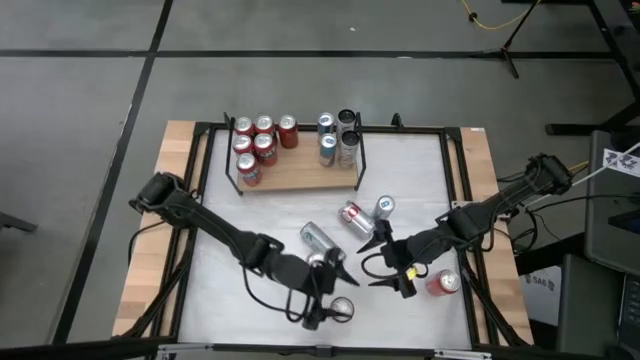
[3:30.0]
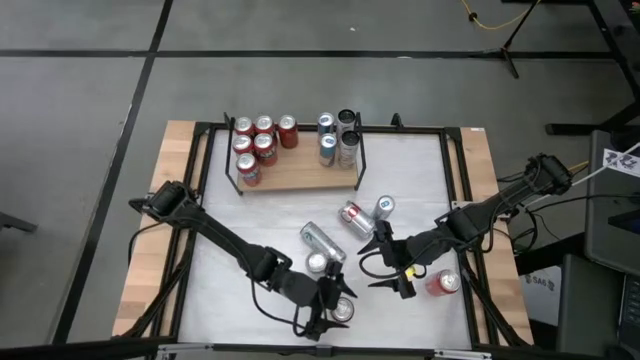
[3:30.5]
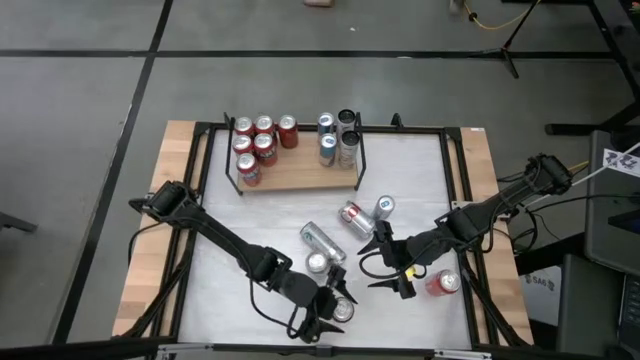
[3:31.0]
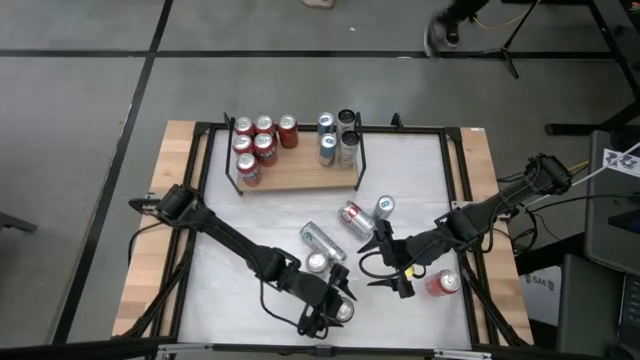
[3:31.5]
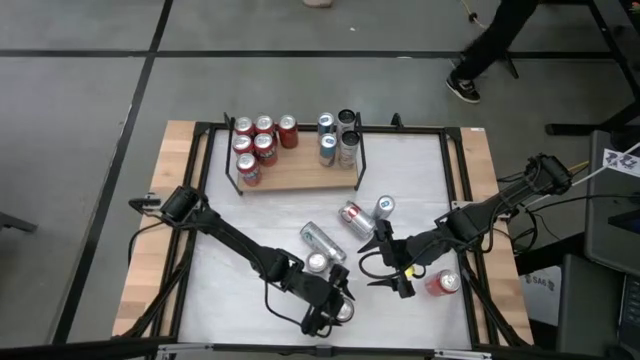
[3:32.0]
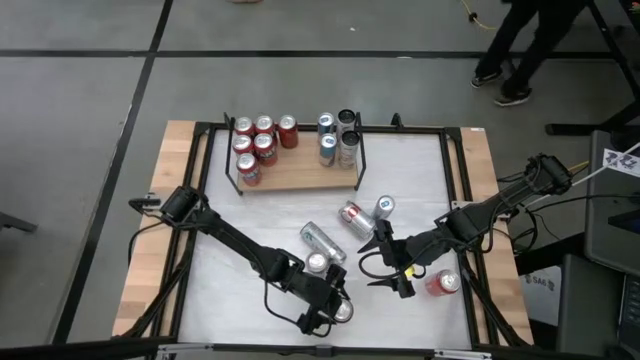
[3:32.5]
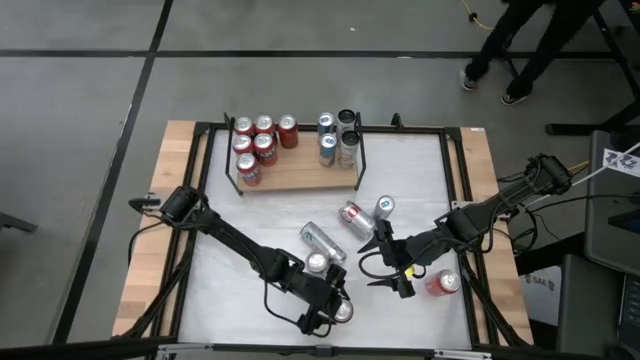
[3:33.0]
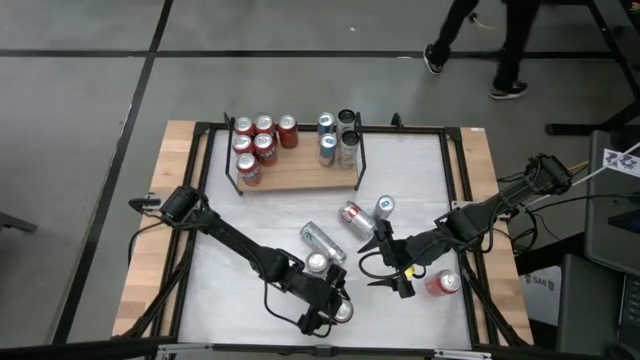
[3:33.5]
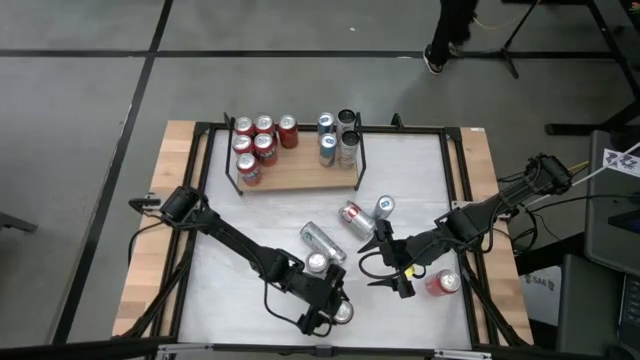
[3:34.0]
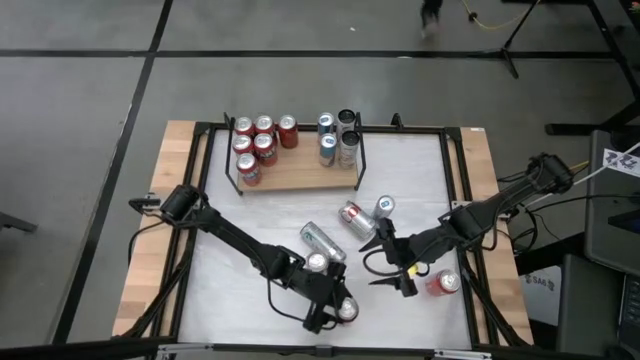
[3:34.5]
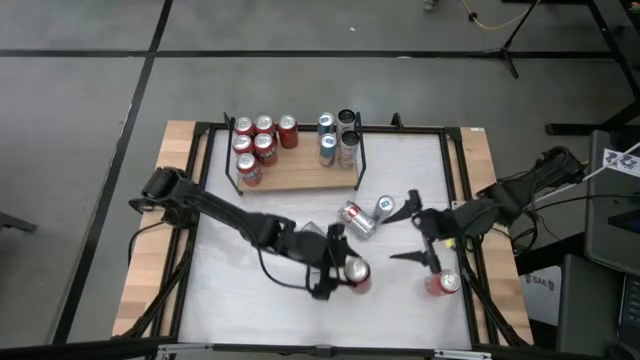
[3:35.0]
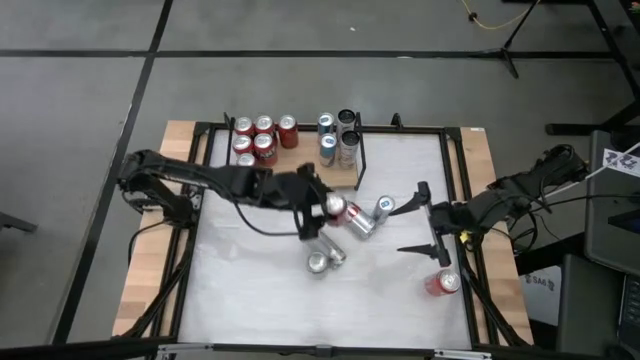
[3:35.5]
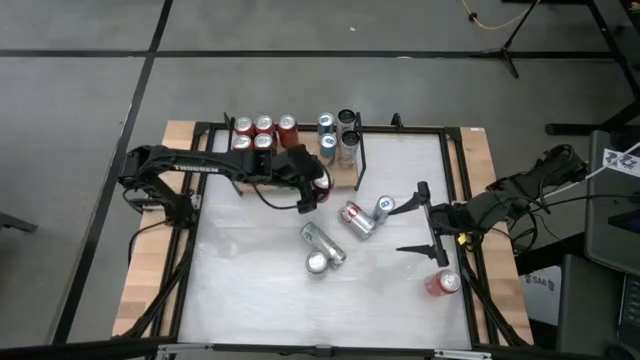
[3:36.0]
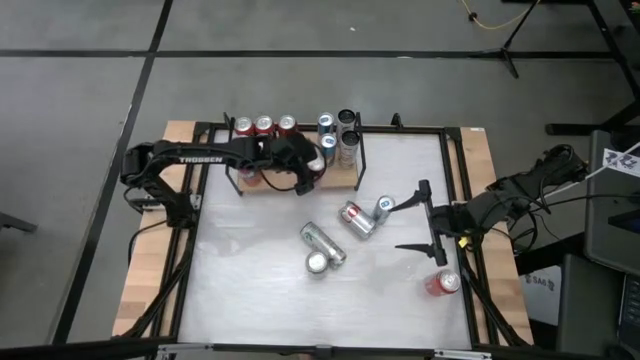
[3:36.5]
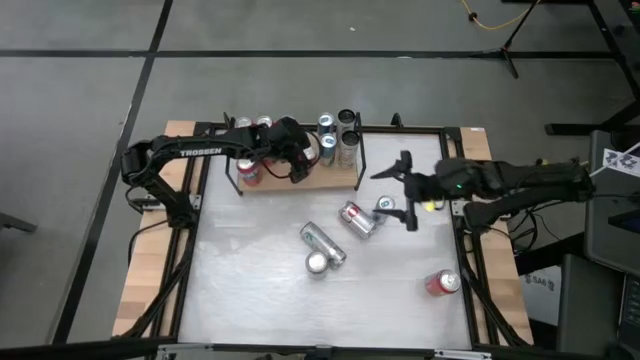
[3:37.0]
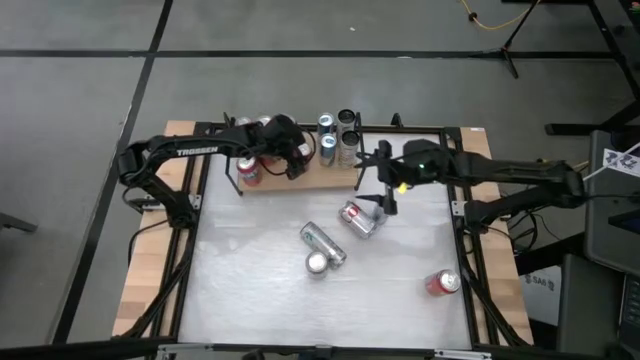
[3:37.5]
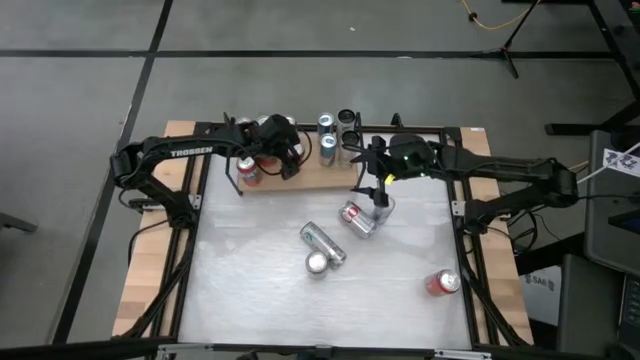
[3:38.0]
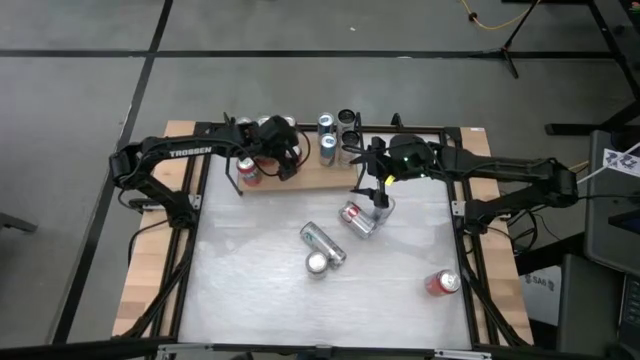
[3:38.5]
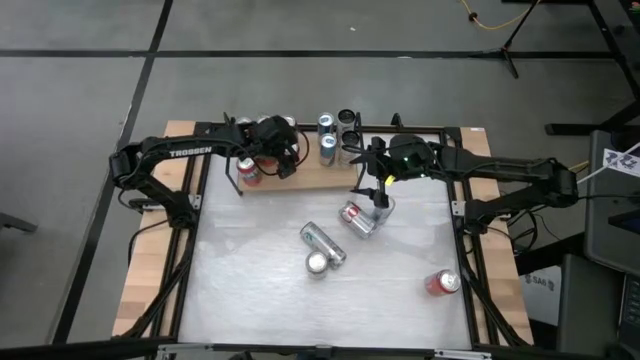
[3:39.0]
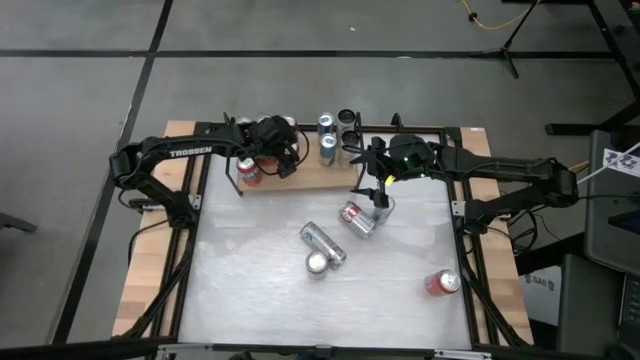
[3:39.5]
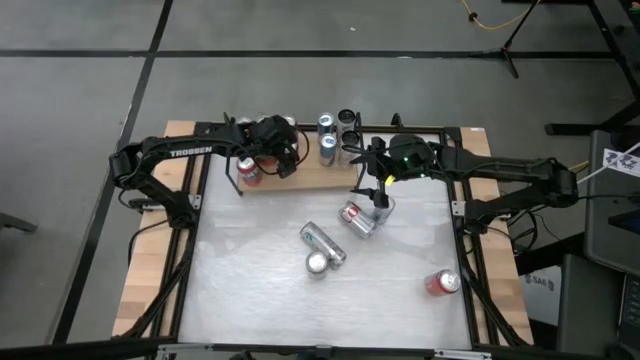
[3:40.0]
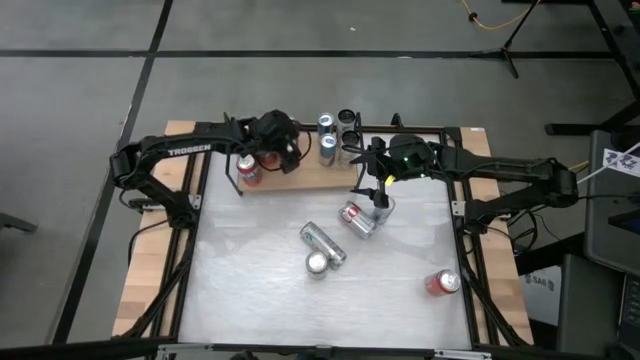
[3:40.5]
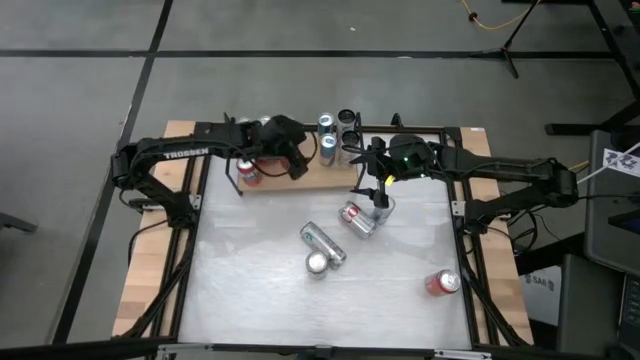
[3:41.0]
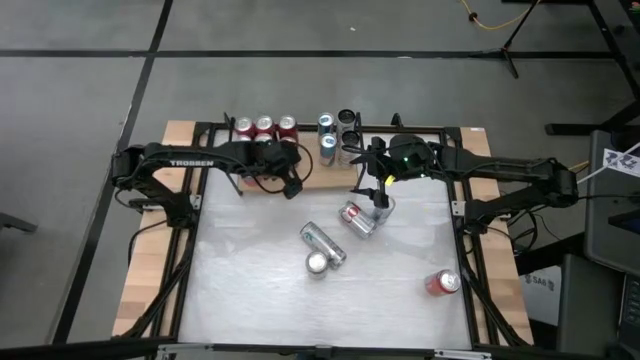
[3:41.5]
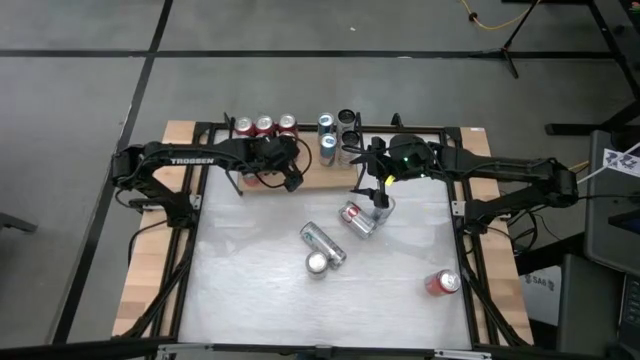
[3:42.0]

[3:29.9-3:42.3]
Task: Place canned beverage on shelf
Put the red black soda can on the shelf aligned with the other red black soda can

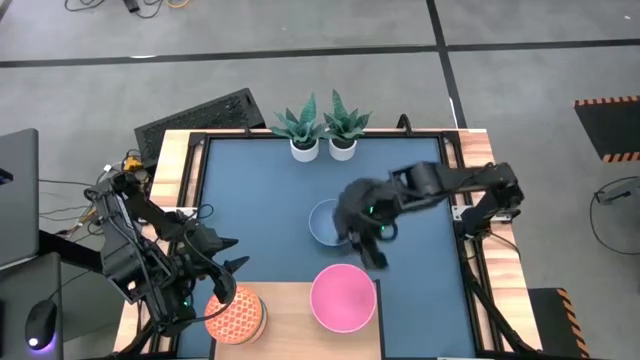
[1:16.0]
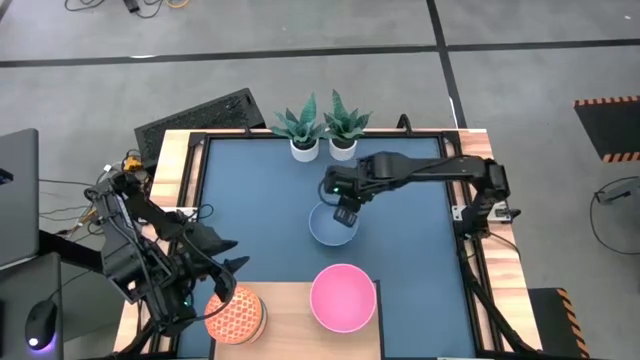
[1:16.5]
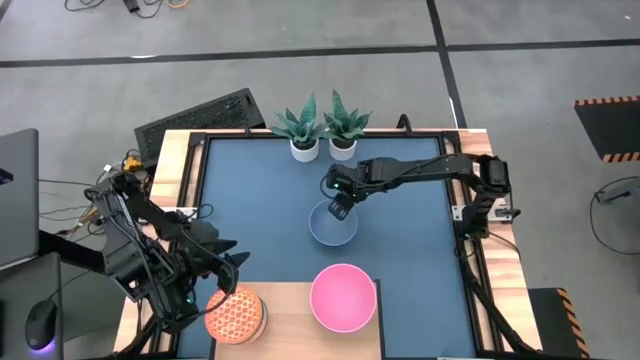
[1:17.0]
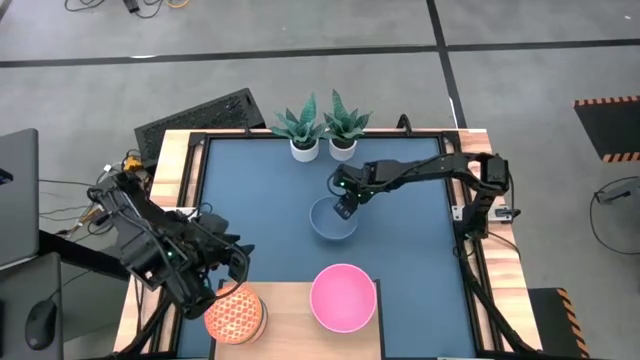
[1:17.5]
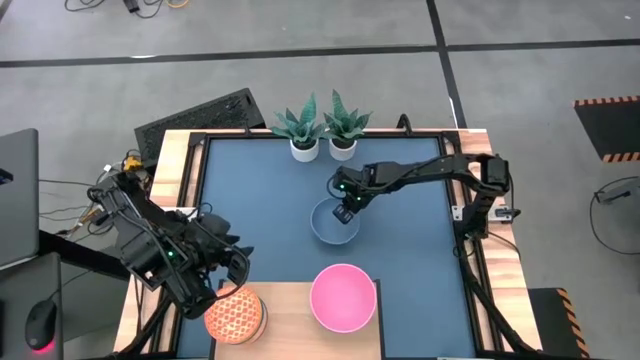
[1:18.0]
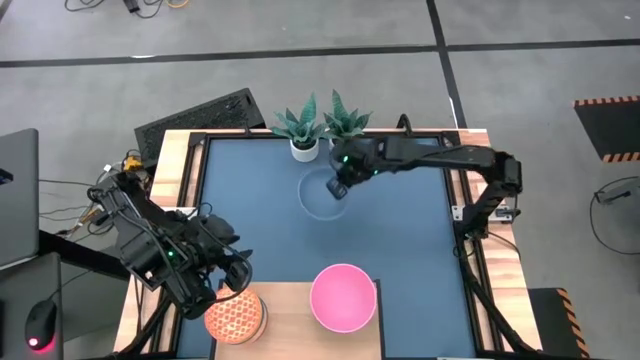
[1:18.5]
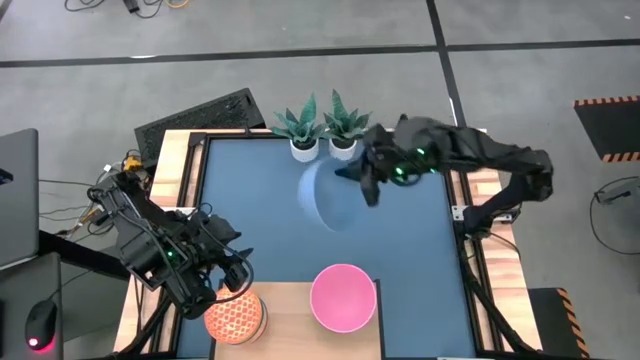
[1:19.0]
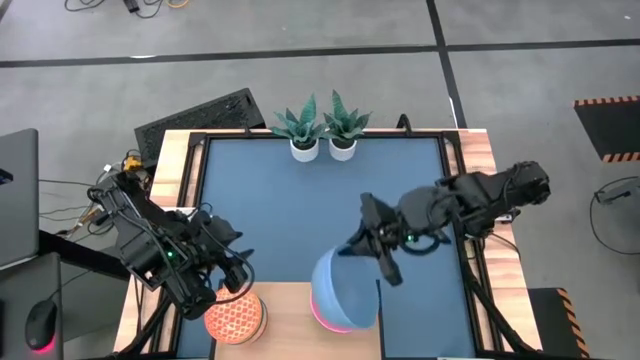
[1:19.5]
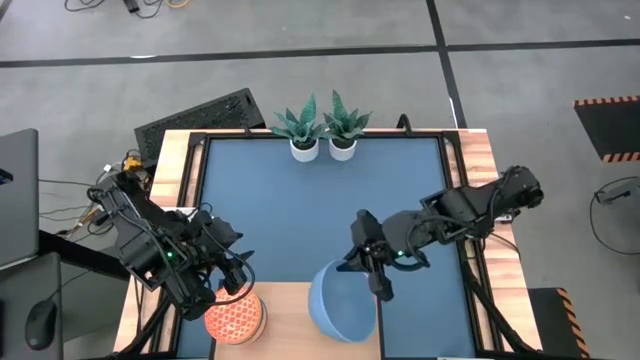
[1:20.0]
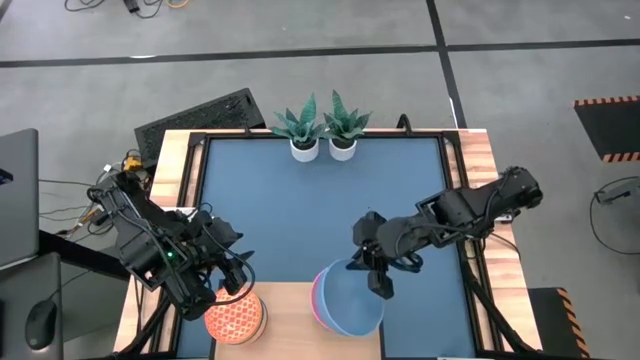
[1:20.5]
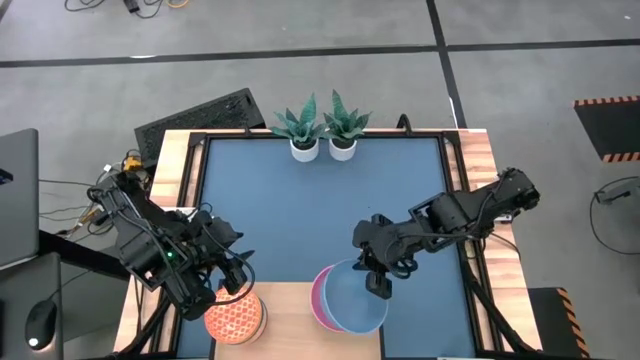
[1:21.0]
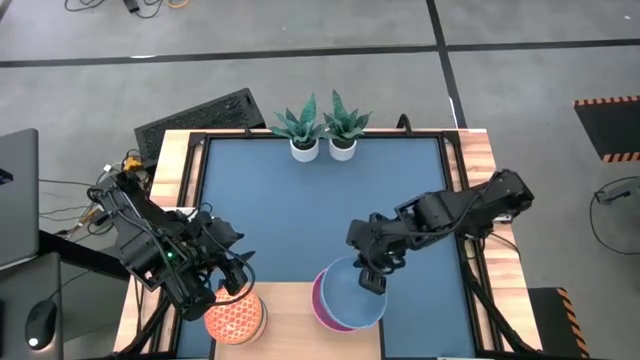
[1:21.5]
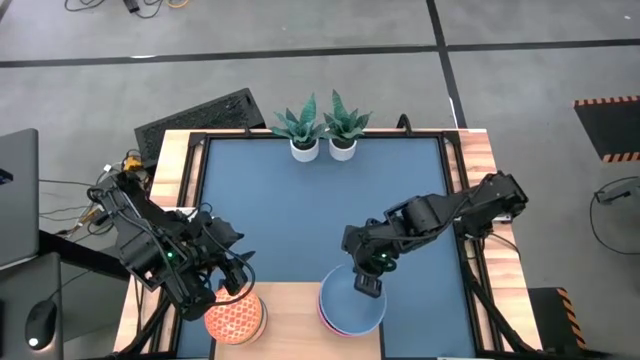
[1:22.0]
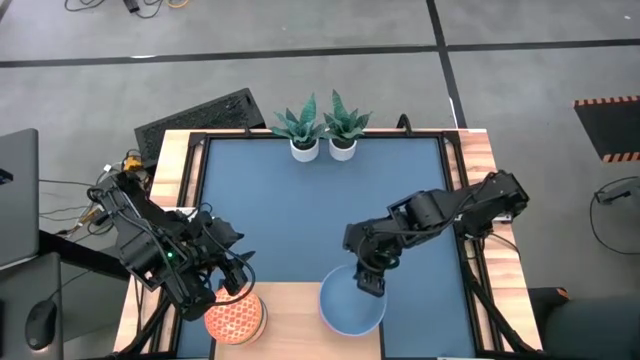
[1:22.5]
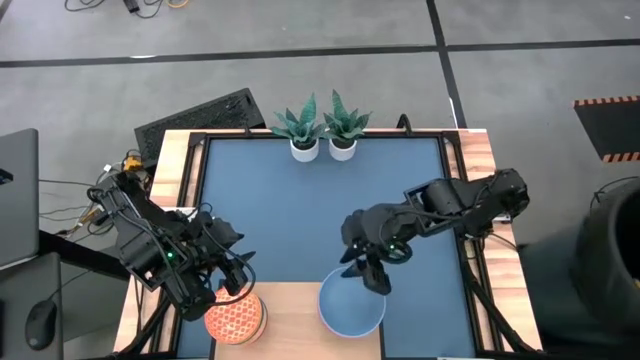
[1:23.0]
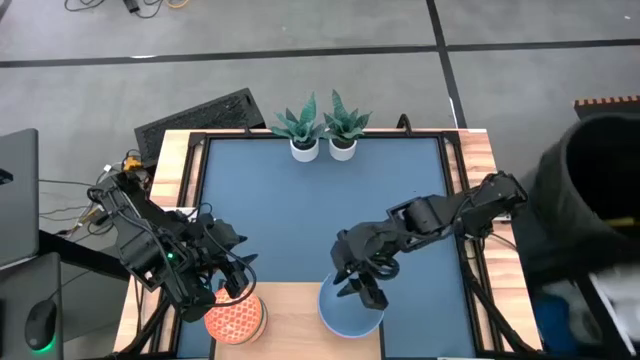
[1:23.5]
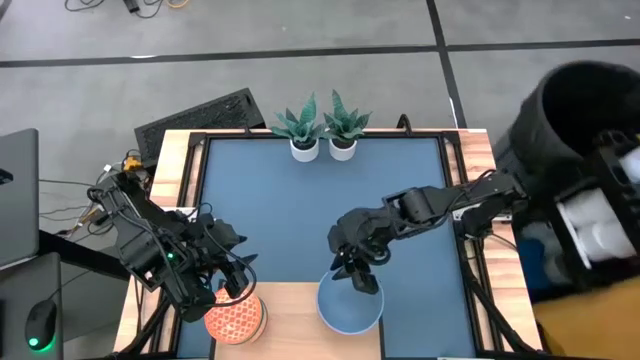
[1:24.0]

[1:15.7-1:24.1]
Task: Place and stack bowls onto a shelf
Stack the blue bowl on top of the pink bowl on the shelf
